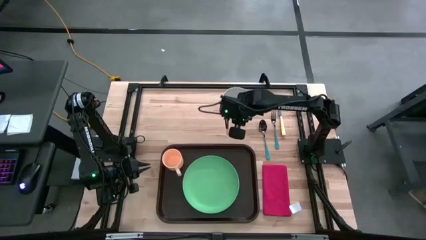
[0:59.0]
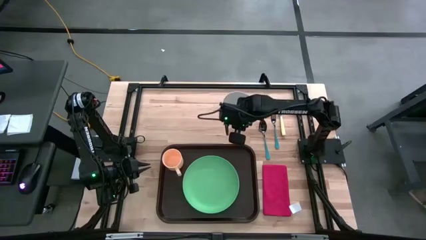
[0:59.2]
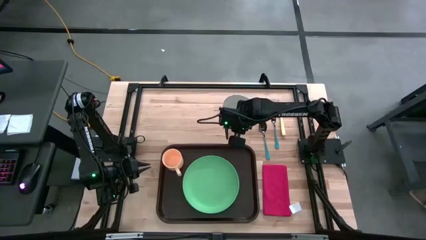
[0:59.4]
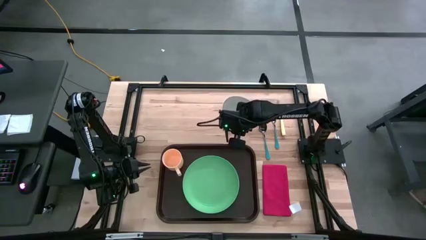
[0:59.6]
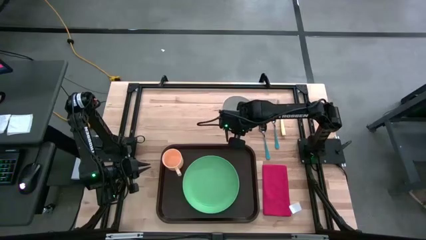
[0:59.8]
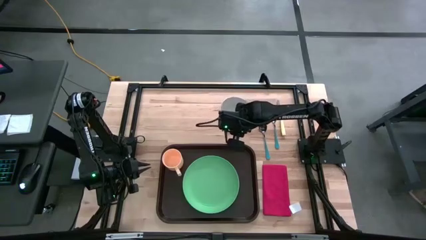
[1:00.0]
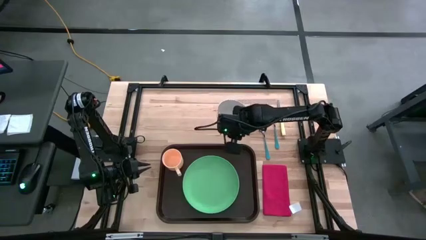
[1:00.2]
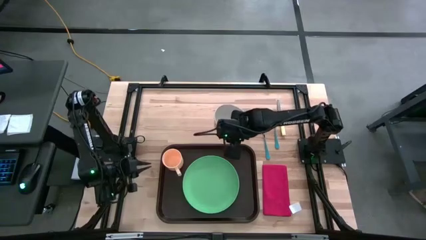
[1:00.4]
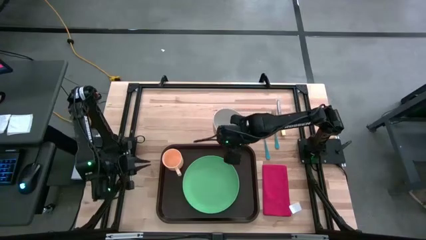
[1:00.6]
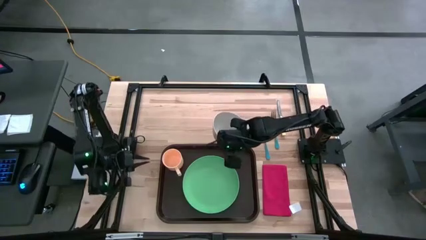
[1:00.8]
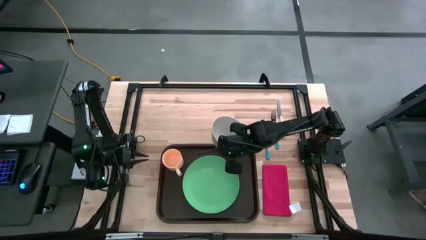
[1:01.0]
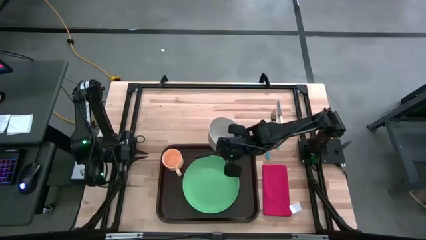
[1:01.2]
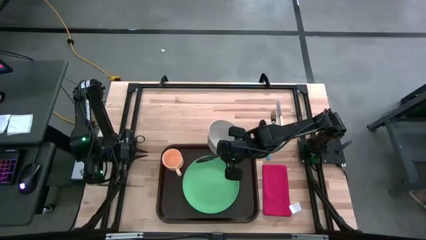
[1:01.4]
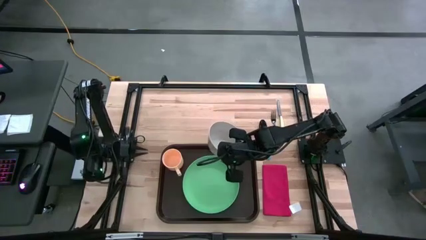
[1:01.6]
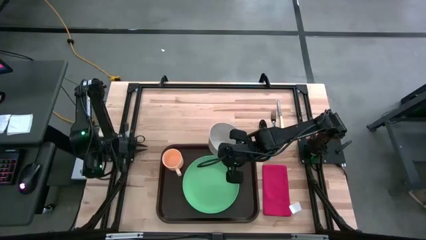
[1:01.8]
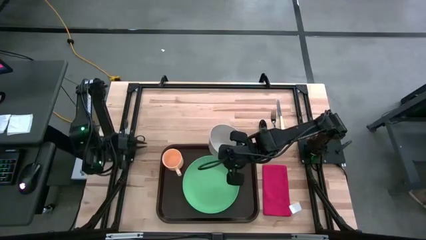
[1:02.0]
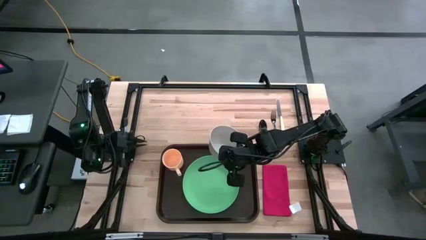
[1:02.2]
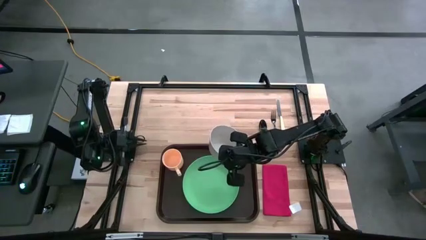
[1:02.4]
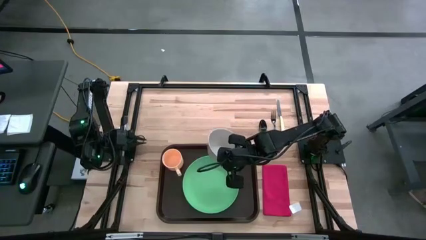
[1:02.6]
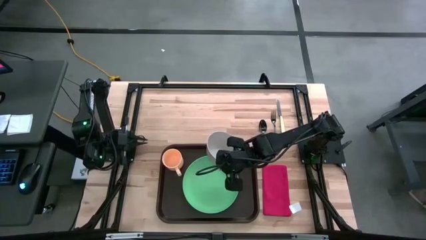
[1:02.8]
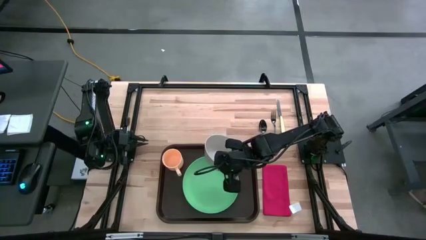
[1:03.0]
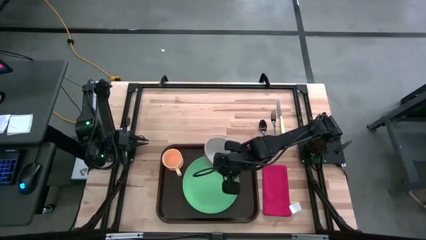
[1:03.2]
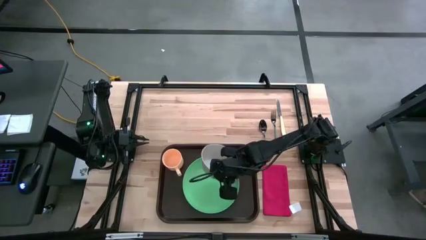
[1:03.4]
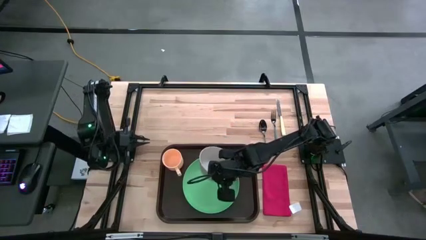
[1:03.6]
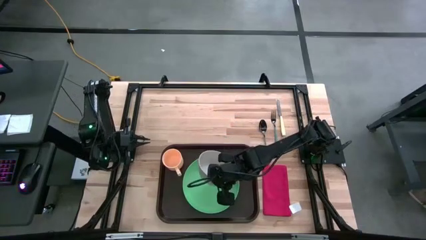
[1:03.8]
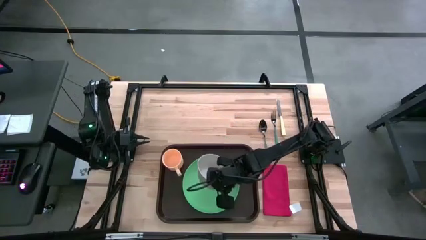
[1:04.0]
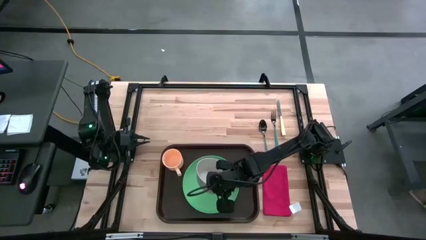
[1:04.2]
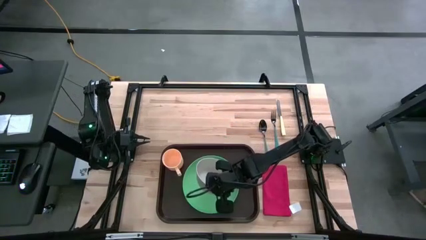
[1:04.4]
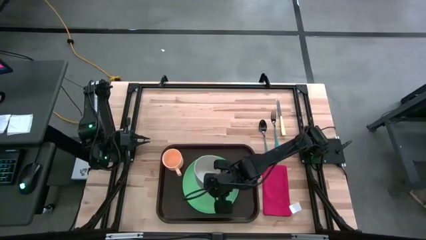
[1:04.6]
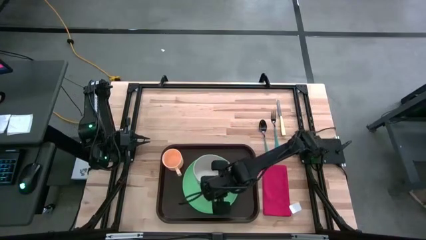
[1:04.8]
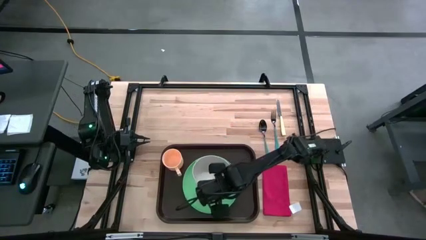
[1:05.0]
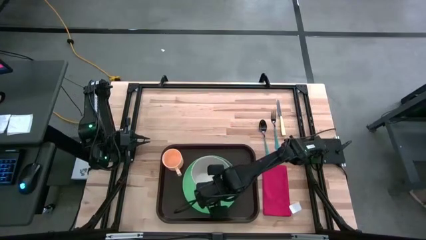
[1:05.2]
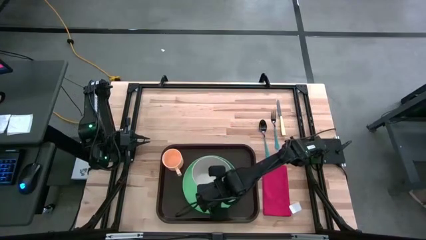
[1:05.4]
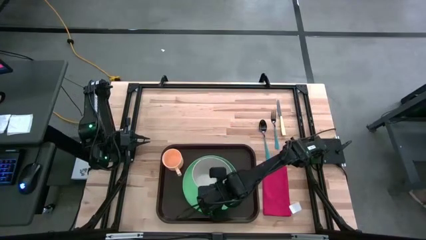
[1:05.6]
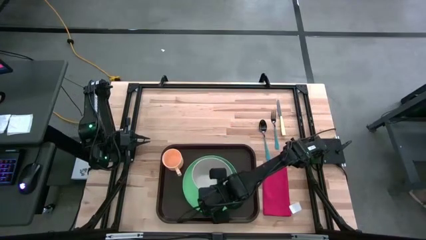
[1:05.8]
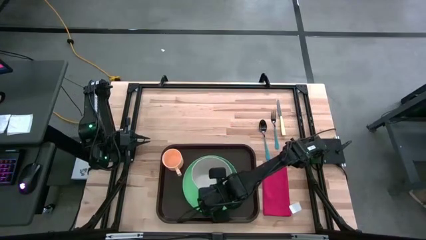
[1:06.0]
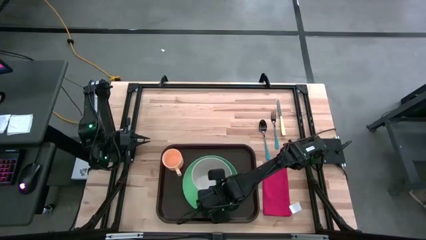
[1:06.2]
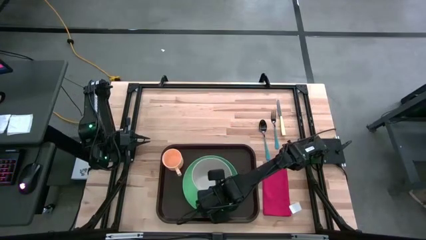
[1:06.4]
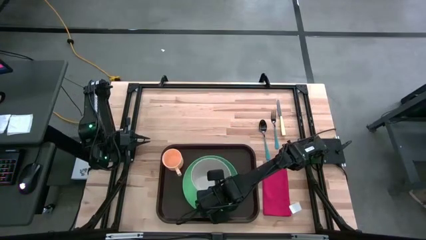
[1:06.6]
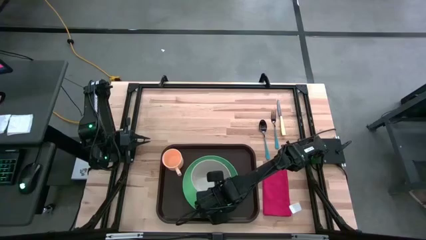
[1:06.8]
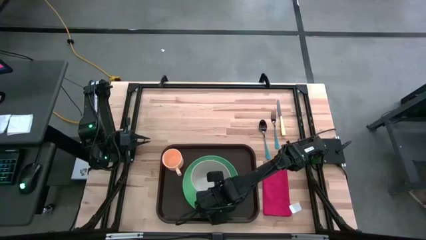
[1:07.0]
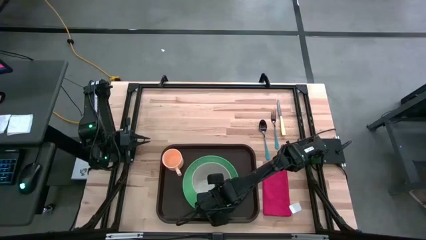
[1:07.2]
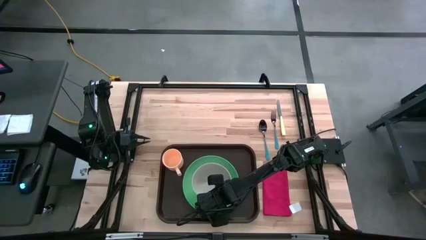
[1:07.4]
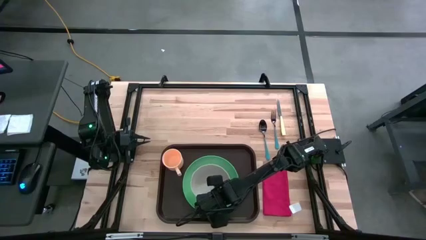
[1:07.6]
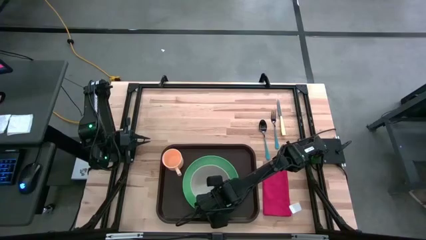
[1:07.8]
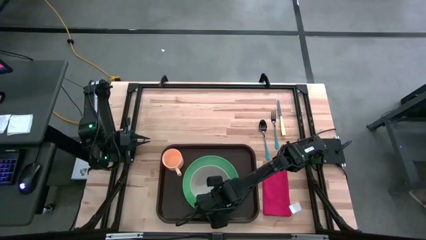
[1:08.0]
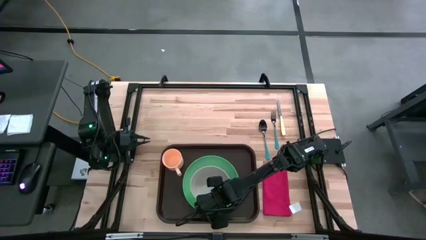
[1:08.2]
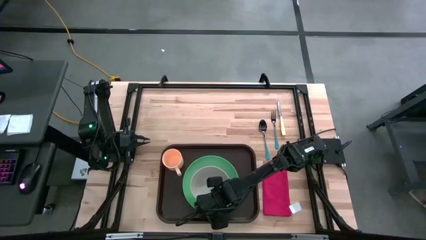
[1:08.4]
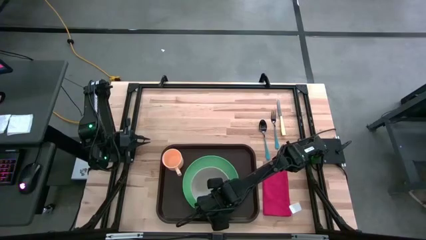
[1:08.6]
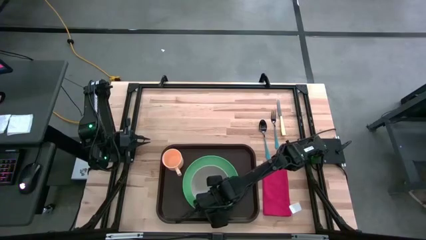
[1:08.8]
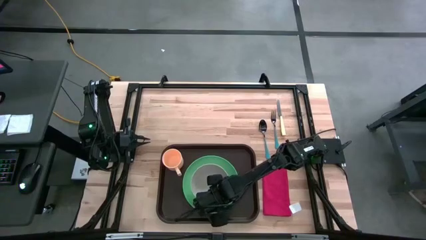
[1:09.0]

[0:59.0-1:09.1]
Task: Set up tray
Put the gray bowl on the green plate

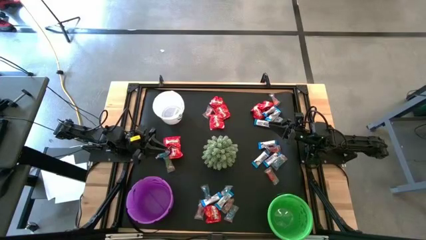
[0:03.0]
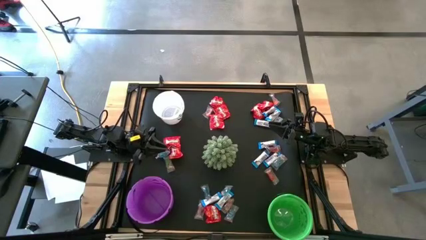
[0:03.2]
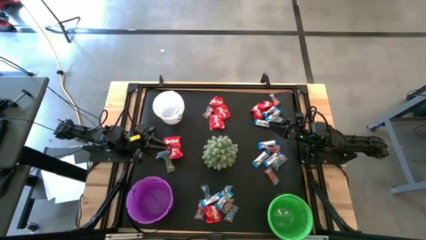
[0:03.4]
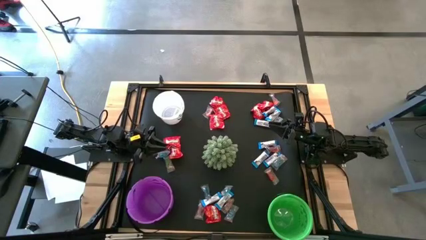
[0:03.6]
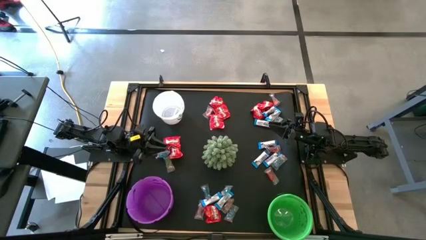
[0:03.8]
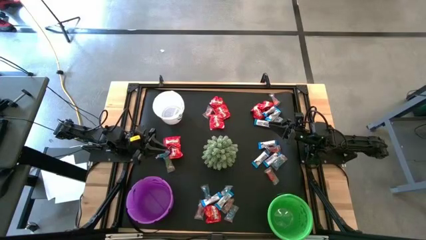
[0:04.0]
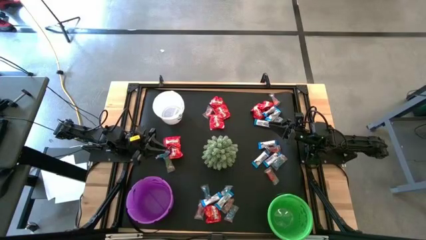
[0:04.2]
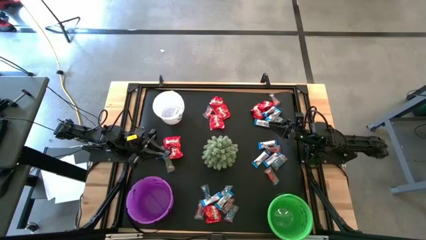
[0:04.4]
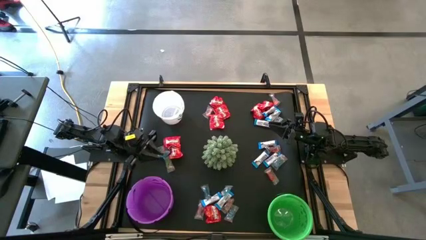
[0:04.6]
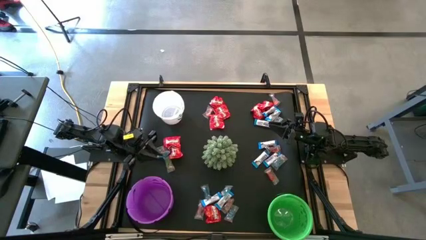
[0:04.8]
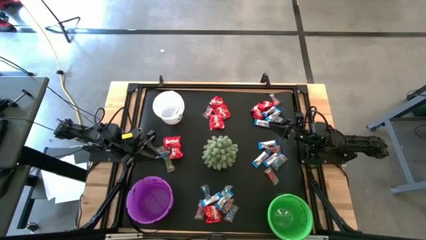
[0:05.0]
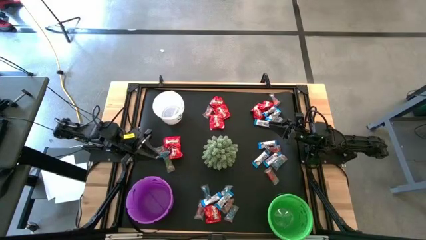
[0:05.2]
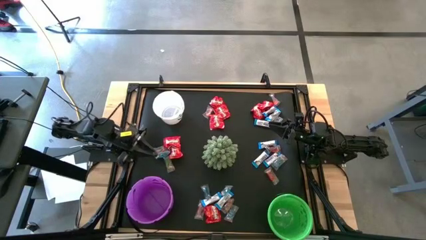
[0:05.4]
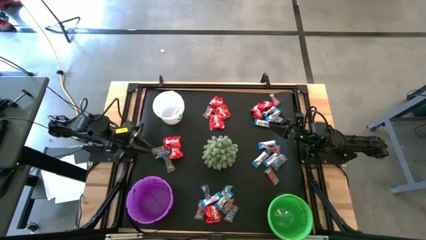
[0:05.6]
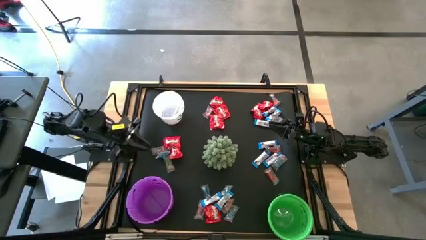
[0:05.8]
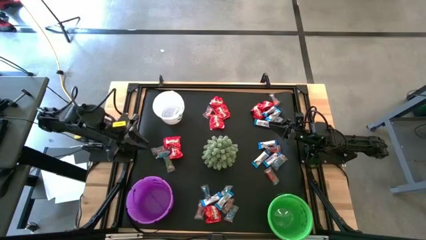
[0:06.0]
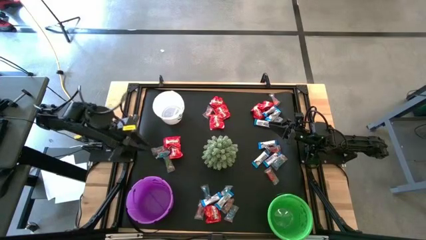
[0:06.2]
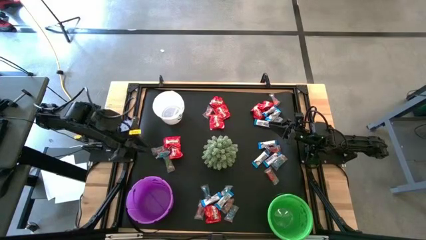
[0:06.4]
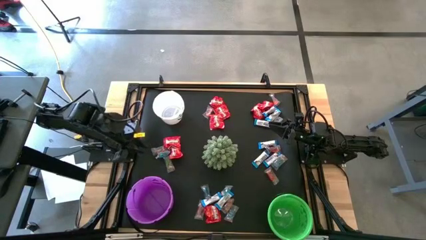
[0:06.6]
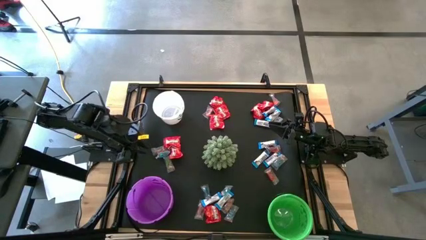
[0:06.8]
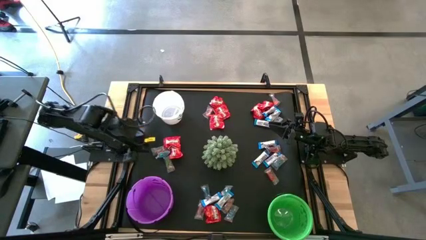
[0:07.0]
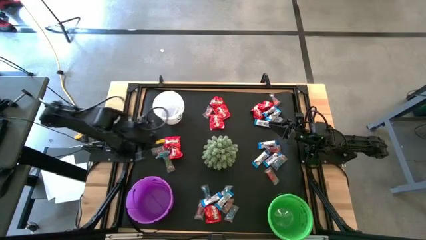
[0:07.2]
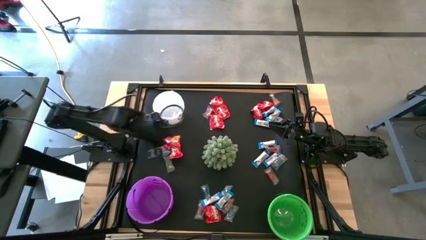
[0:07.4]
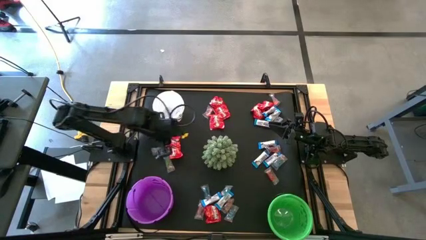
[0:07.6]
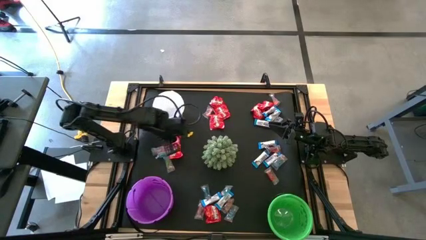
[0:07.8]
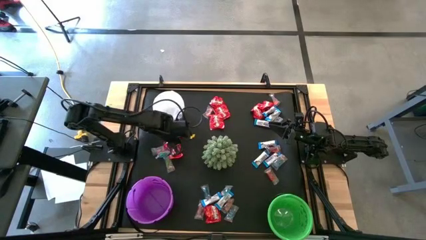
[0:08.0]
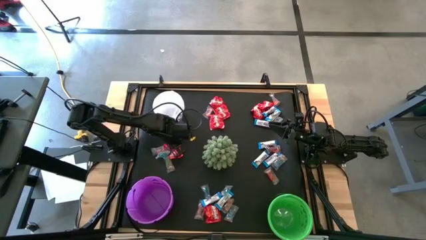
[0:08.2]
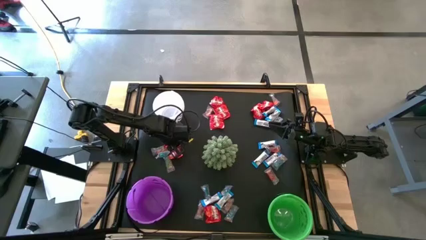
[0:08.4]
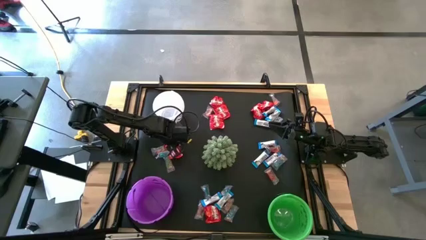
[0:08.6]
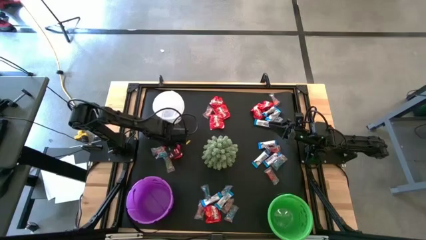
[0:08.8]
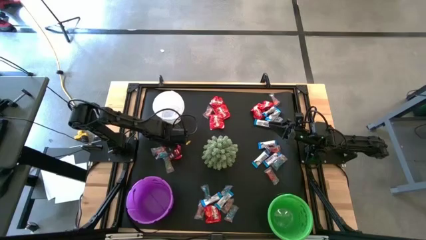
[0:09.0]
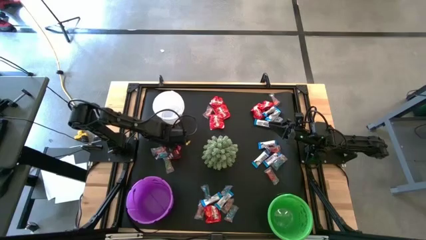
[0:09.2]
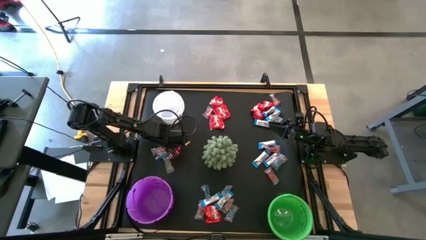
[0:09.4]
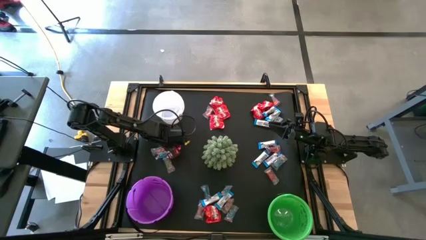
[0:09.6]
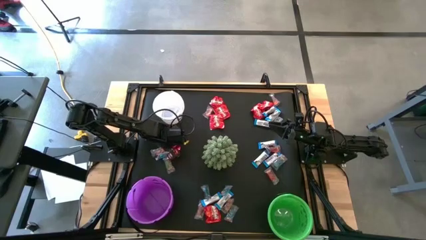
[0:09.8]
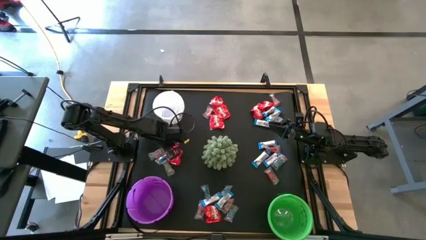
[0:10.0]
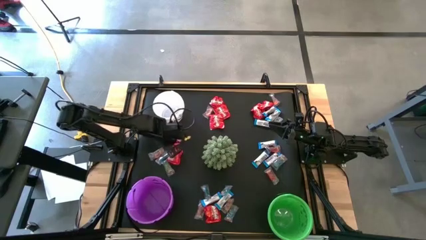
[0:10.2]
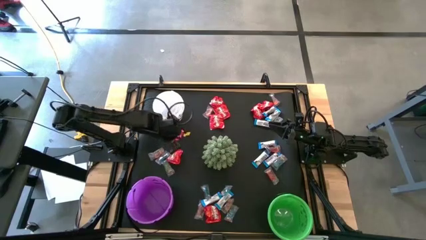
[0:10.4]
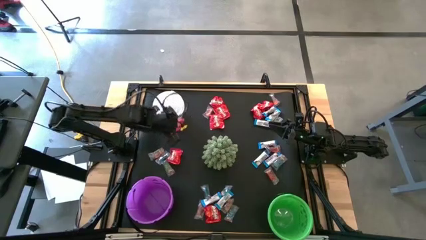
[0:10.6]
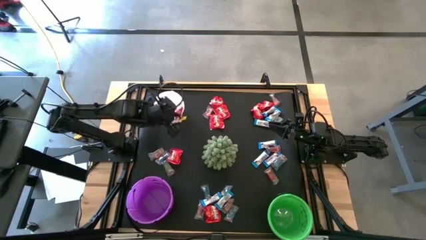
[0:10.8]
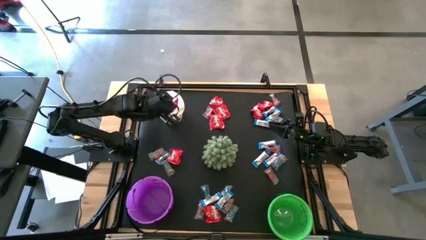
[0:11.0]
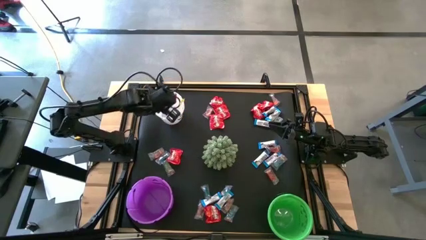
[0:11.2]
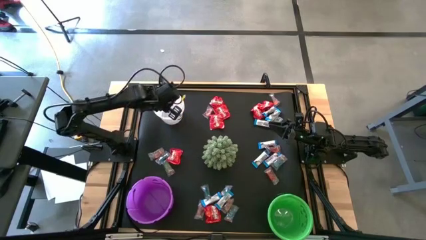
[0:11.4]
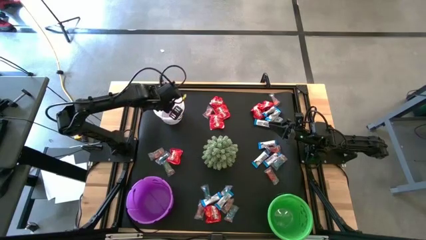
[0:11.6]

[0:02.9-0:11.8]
Task: Organize candy in baskets
Put the red candy into the white bucket
